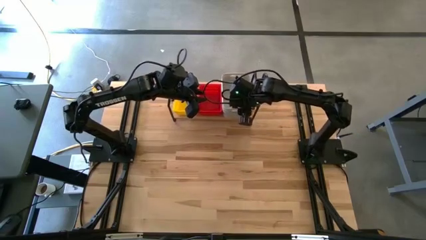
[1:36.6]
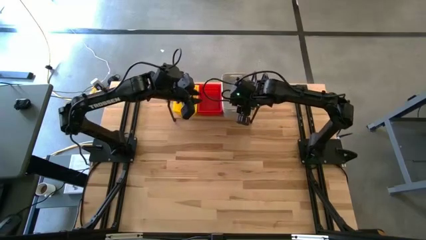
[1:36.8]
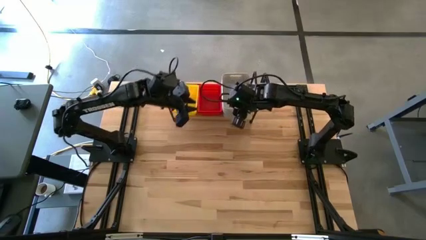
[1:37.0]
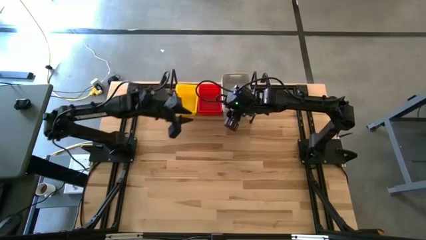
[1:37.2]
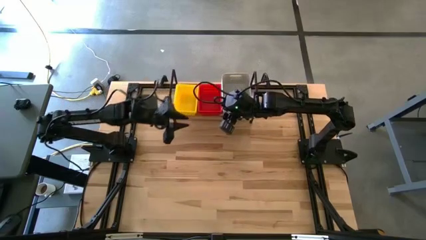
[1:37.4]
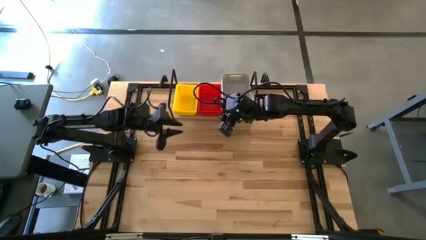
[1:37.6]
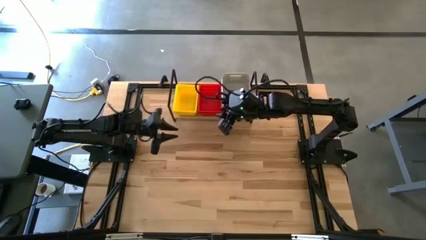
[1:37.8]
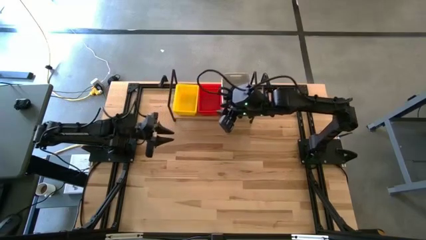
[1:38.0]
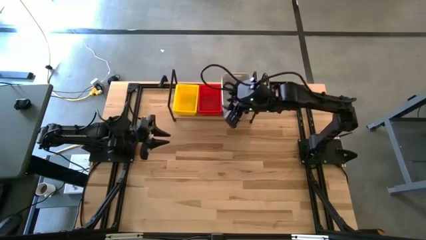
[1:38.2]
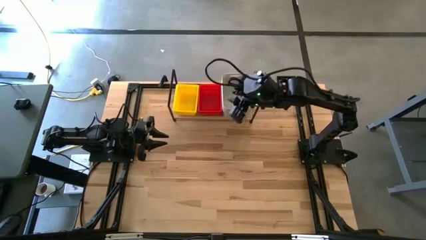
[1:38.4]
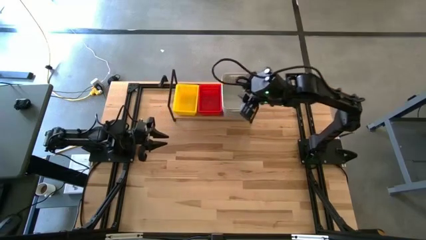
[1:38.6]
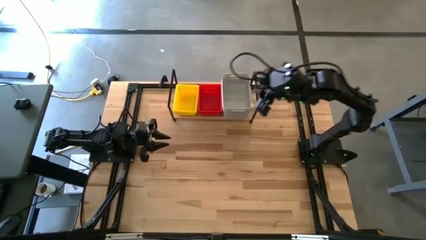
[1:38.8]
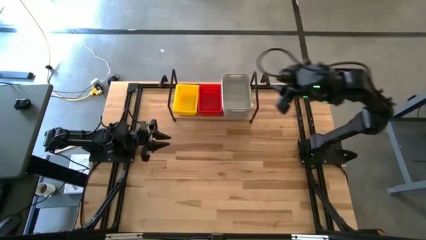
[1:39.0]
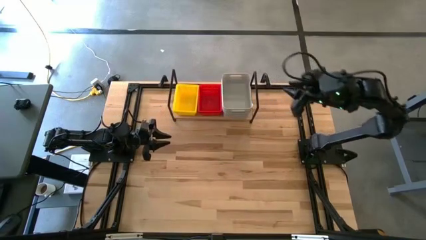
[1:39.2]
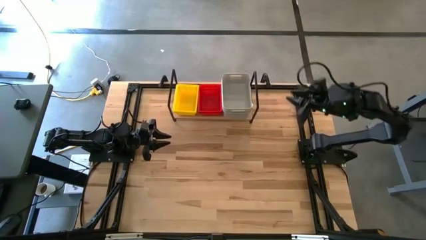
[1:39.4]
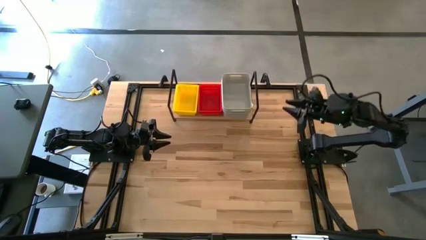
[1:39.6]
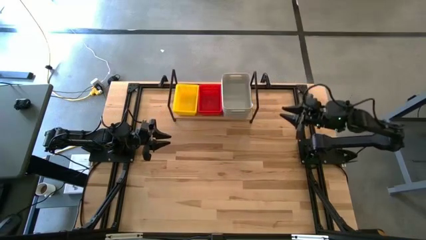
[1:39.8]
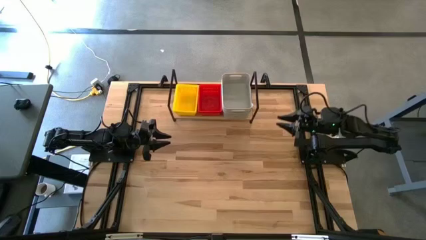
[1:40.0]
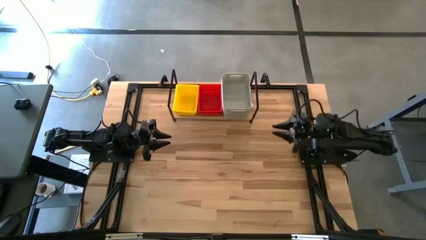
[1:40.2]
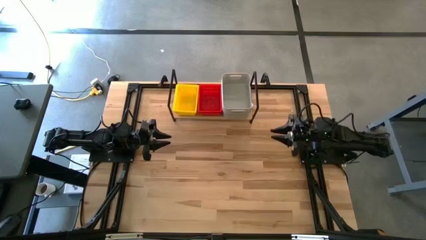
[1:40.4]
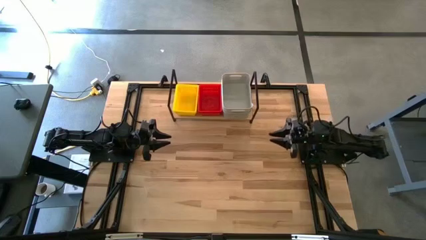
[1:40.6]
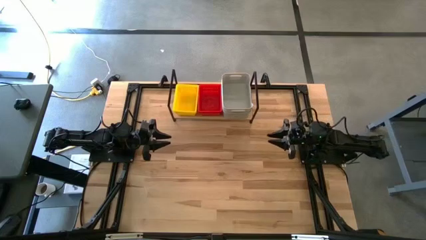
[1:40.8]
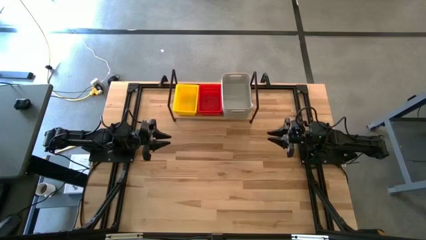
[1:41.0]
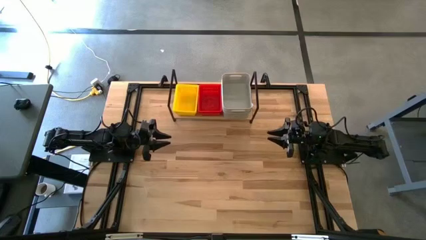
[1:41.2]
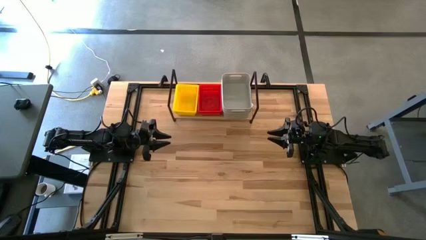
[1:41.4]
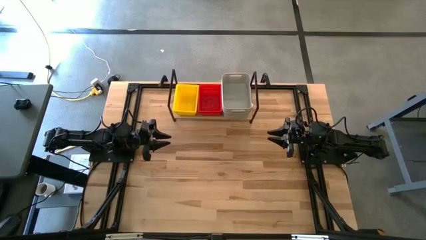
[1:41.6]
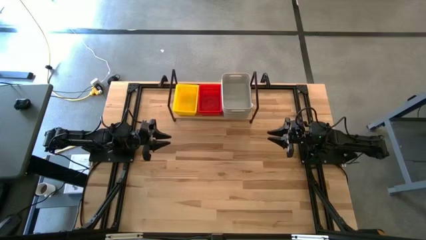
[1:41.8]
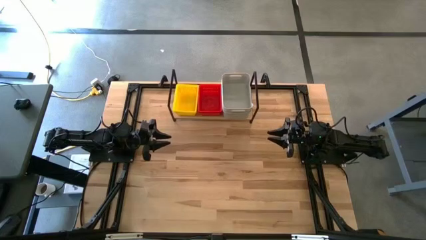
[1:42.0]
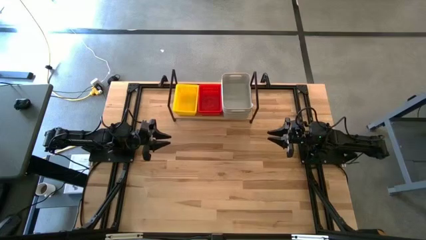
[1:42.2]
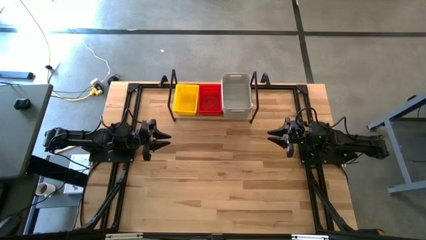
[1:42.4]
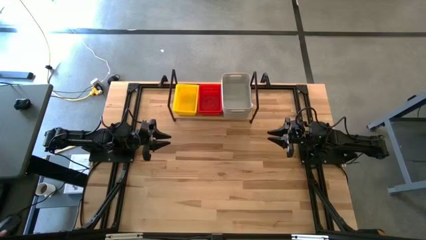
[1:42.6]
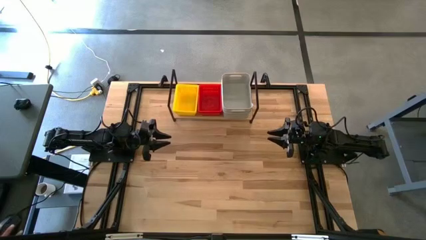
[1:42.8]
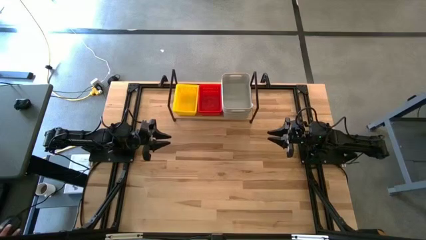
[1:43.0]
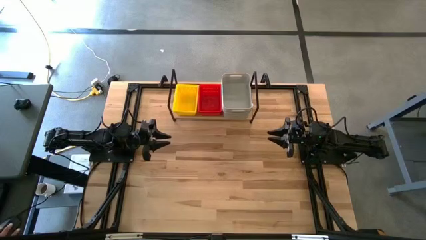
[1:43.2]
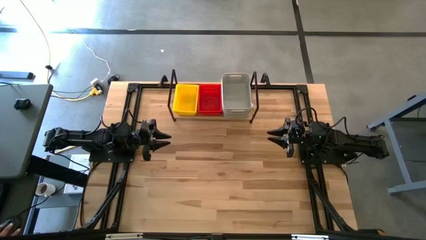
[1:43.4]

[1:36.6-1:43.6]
Task: Stack baskets on shelf by color
Return to Home Position

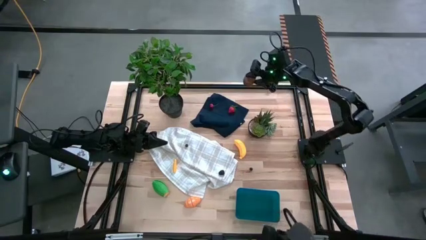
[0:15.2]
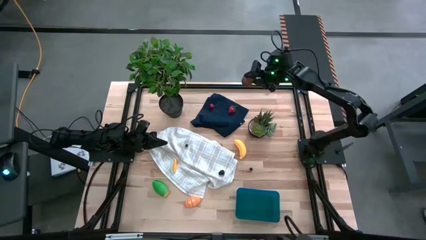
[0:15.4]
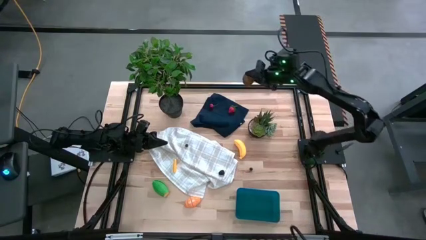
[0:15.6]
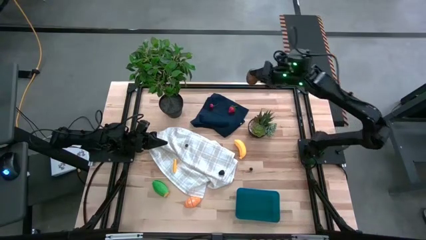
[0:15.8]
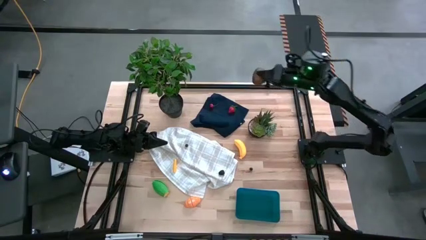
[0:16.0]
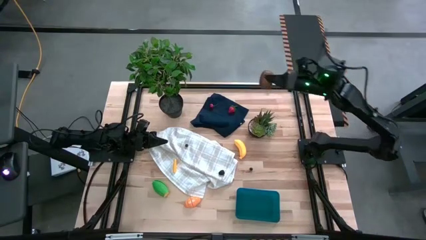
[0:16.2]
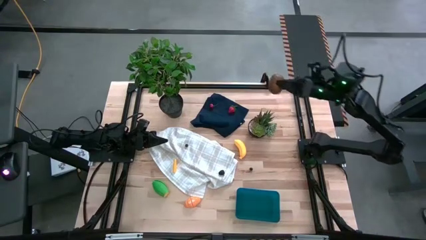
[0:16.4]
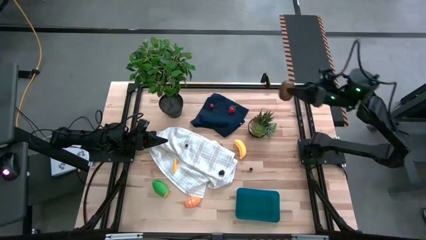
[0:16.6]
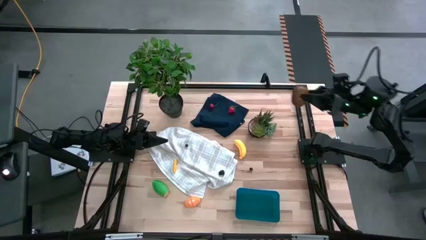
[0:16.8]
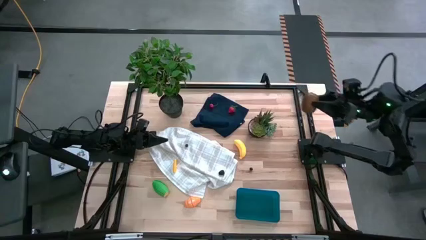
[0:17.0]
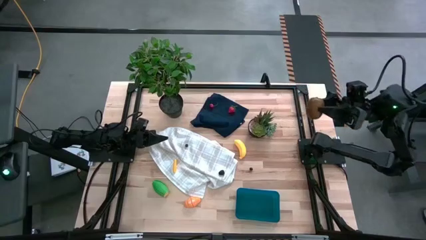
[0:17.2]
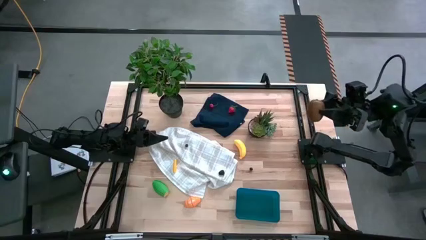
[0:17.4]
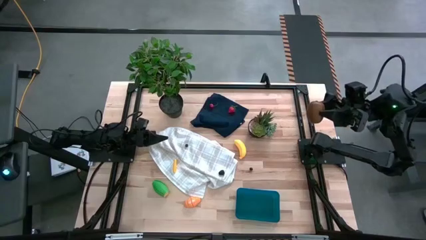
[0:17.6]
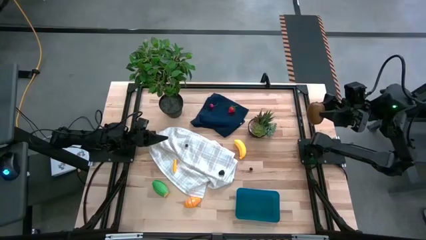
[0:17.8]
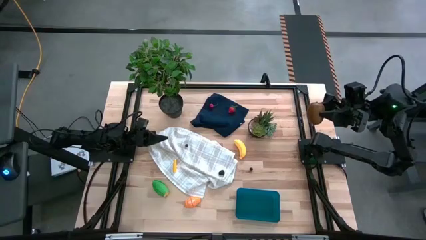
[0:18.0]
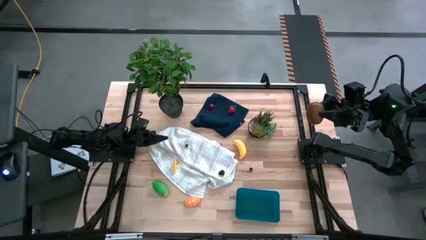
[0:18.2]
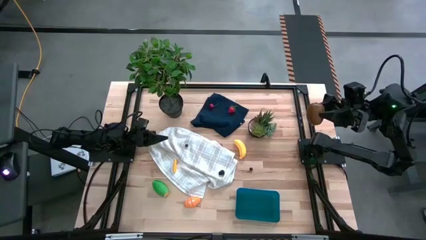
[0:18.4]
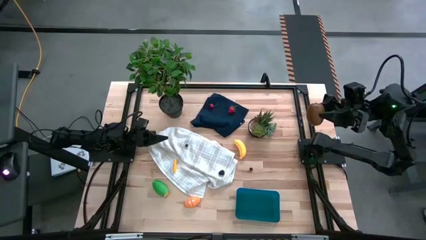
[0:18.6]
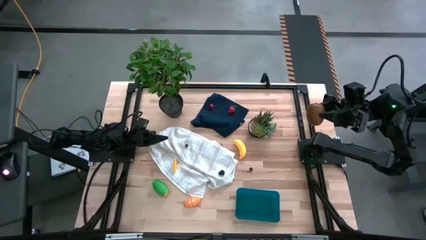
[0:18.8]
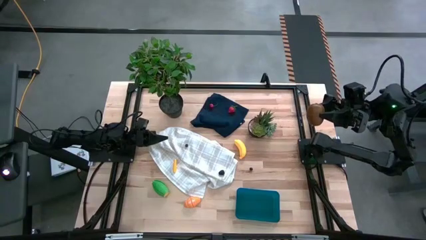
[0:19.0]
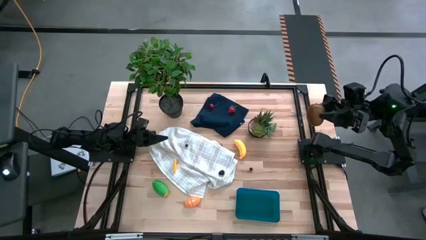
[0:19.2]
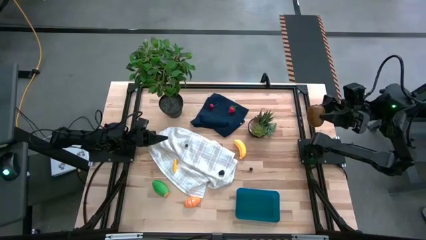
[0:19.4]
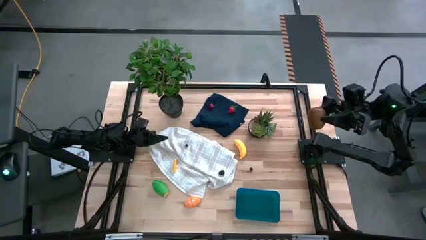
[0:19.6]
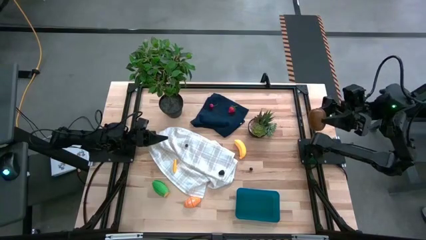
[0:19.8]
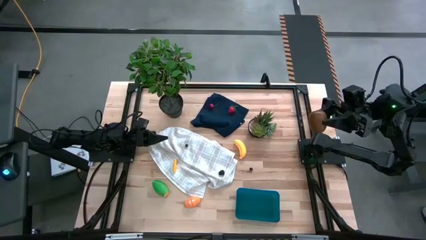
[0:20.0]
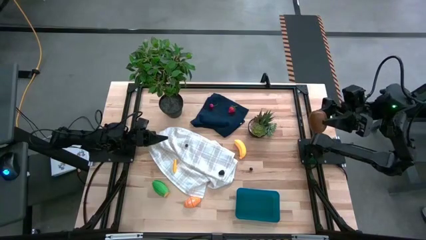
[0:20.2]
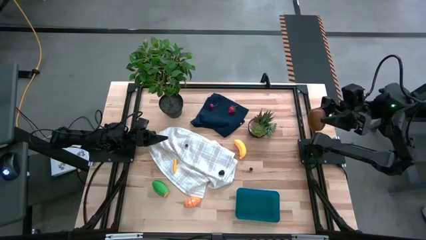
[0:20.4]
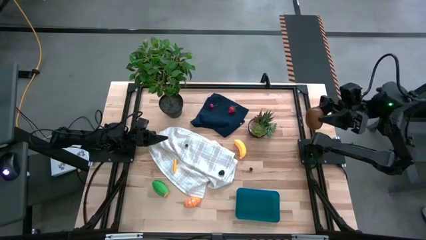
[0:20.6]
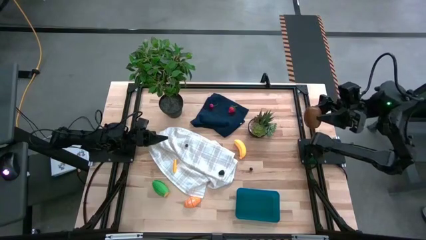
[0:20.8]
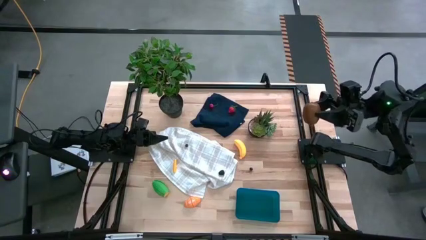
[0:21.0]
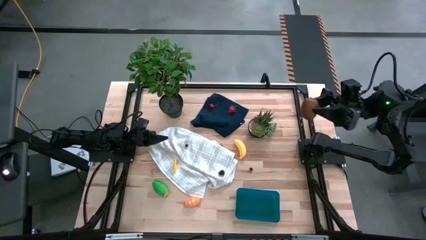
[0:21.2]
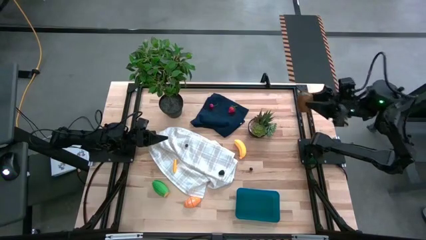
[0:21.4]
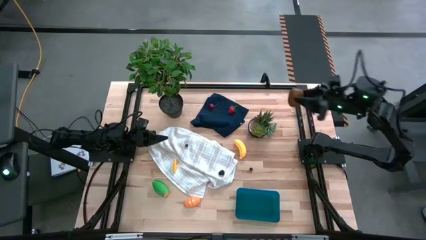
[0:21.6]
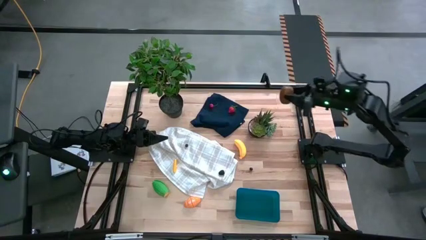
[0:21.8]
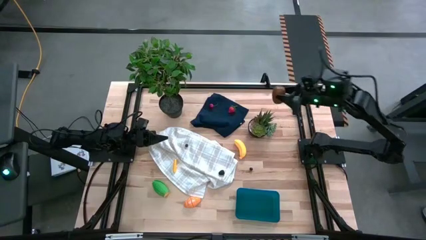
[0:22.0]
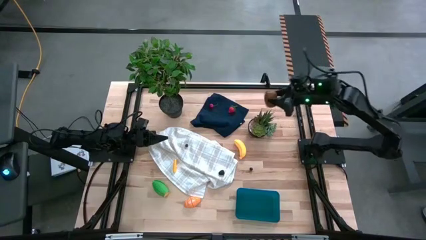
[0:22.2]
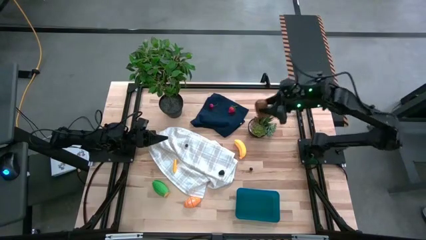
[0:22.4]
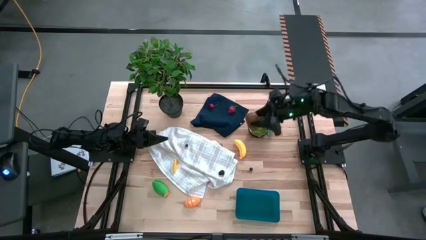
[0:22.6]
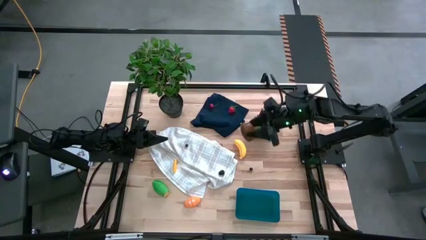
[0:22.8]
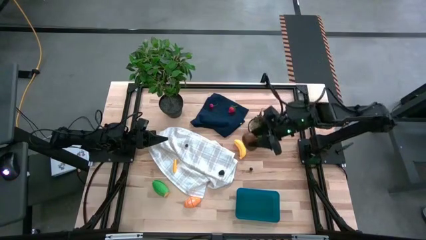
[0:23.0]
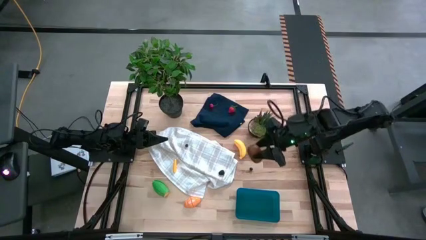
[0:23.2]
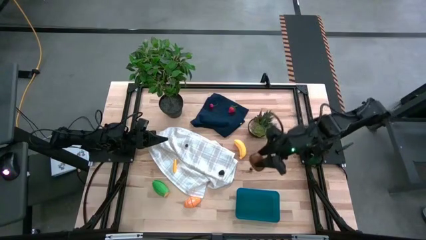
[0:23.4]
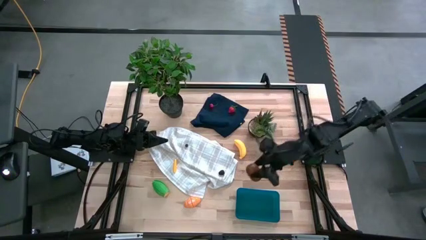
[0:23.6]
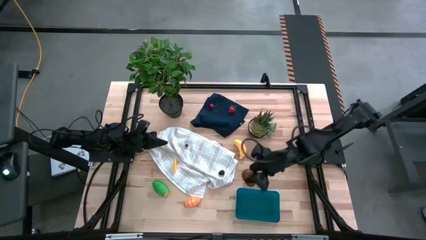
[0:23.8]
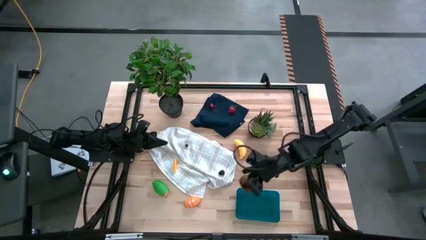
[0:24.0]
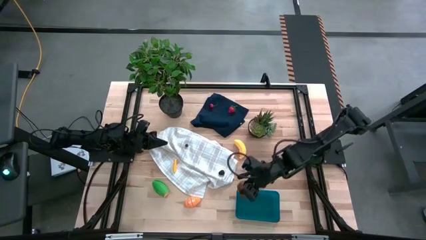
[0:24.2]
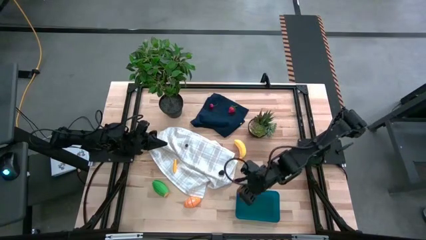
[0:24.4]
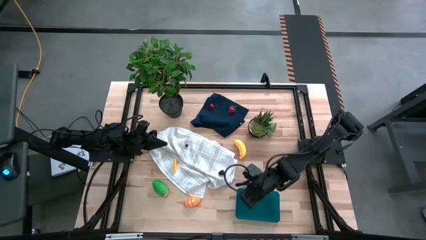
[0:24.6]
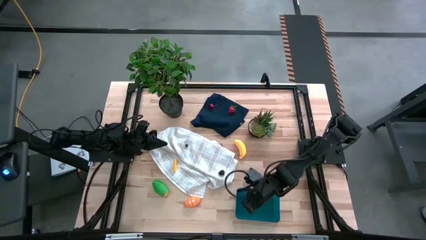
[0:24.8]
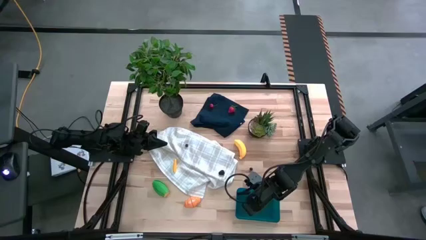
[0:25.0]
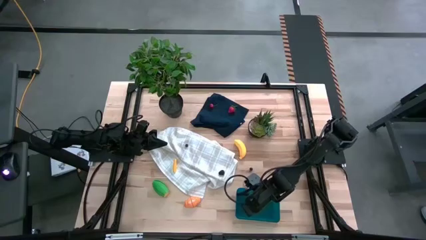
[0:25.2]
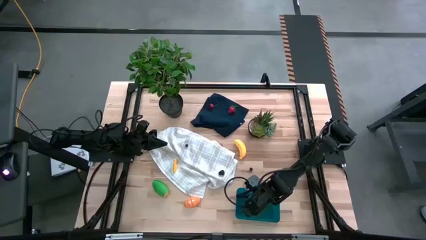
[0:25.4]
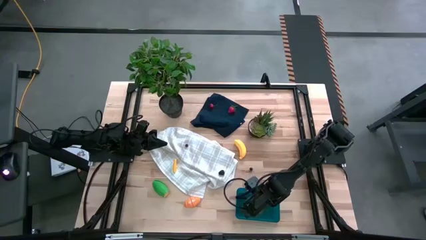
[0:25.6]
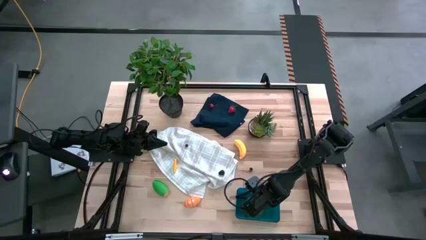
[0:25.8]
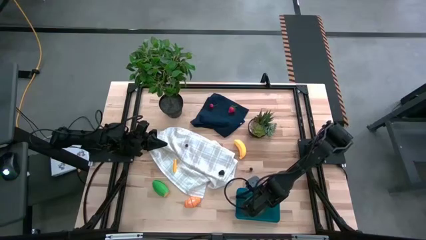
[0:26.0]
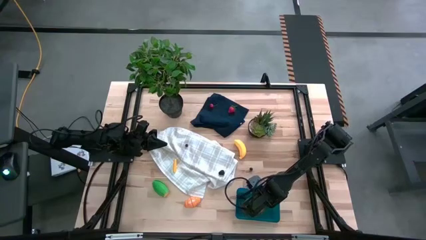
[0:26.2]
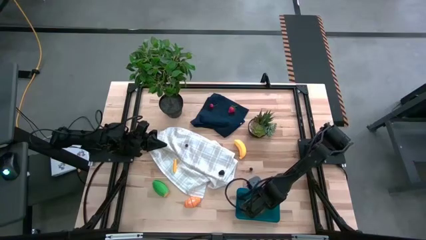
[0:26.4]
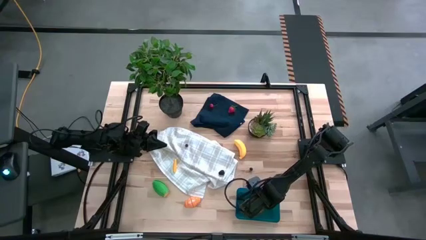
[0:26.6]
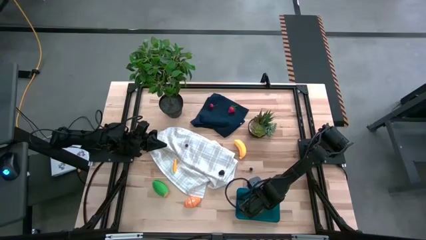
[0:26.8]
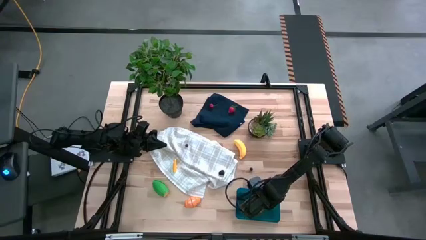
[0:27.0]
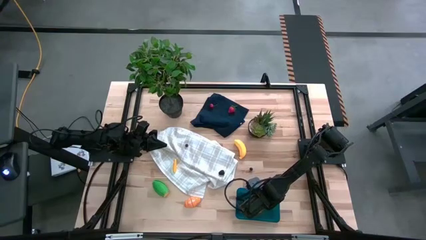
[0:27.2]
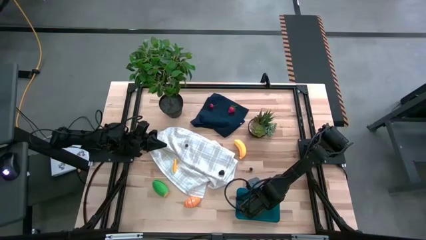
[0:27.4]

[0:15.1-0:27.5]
Task: Pick and placing Produce into tupperware
Put the kiwi into the bin
